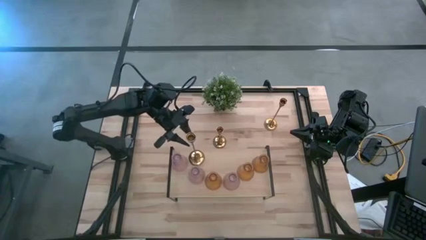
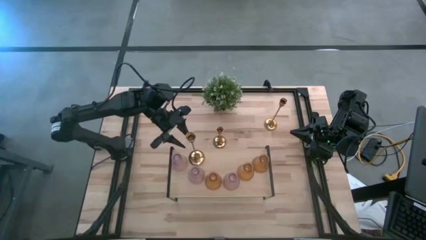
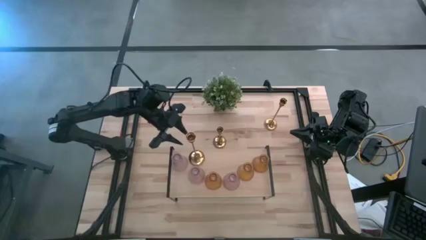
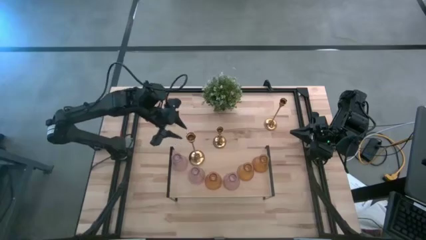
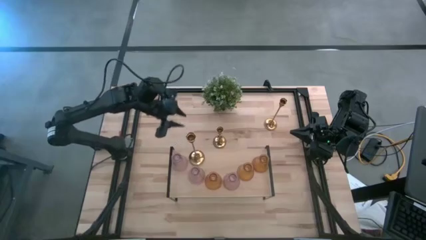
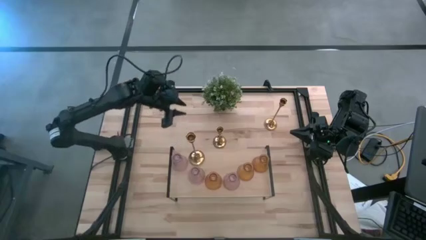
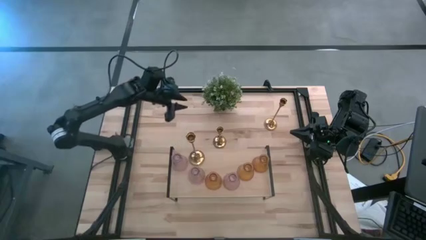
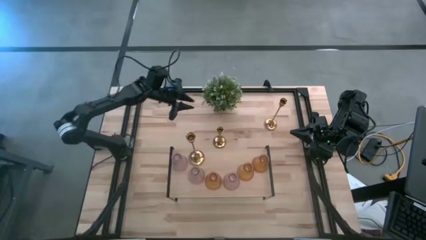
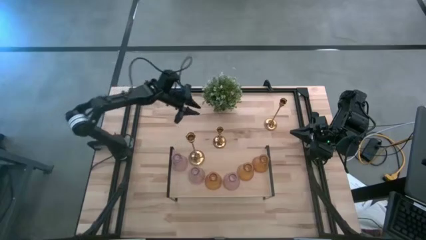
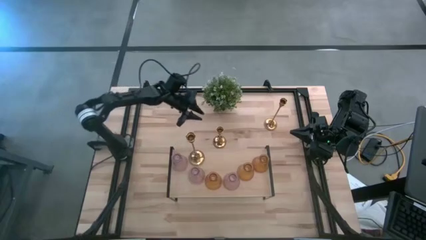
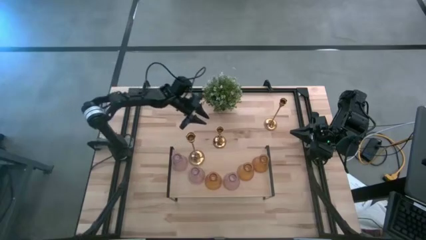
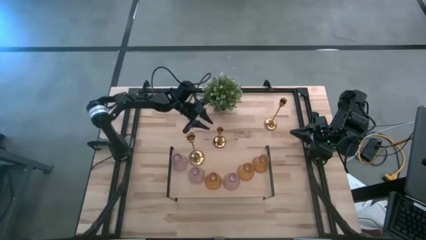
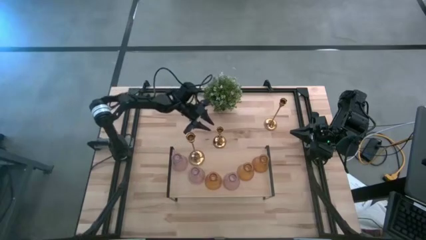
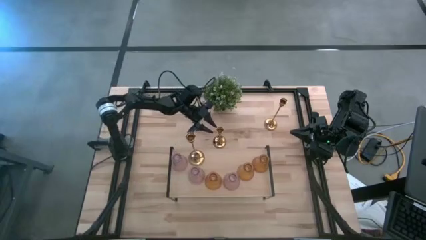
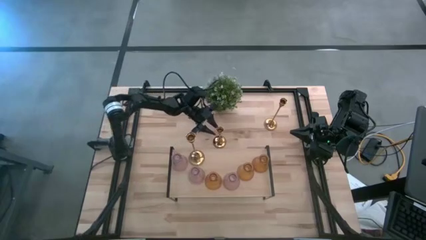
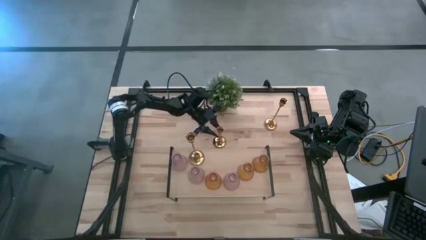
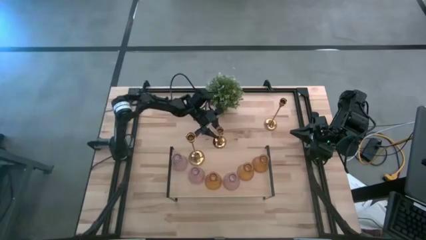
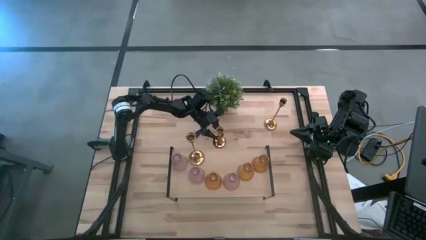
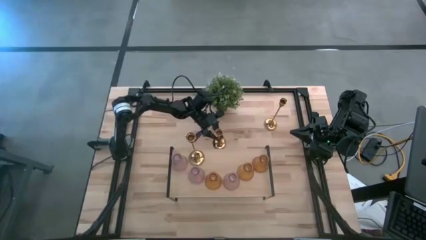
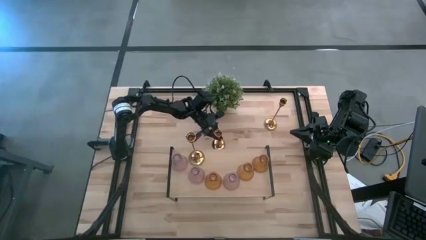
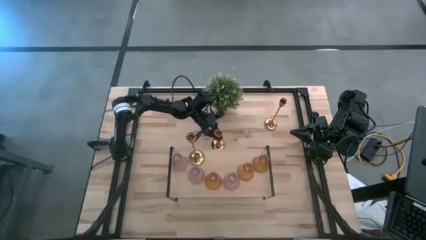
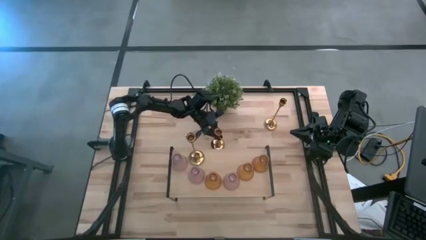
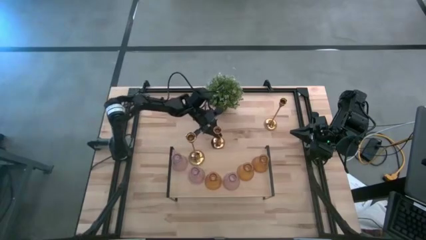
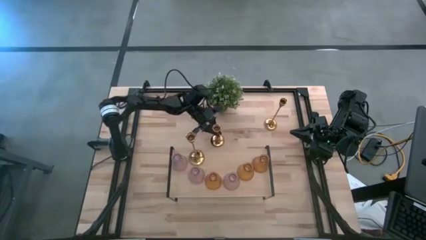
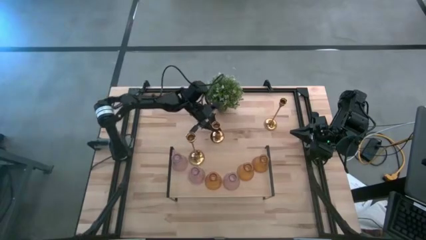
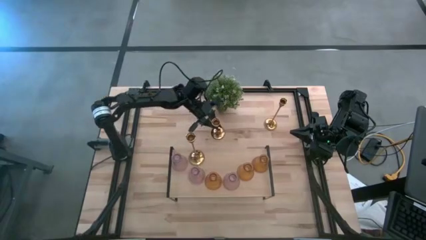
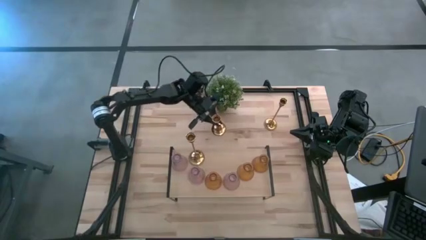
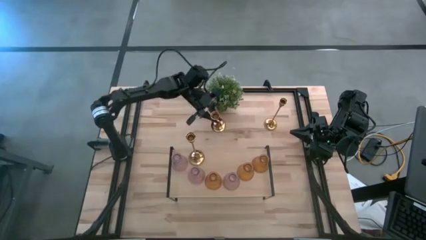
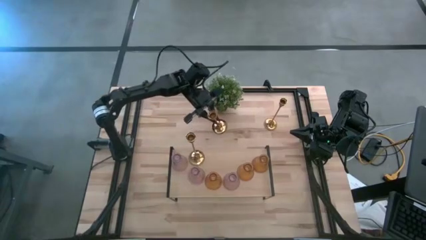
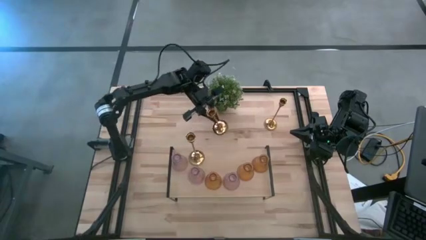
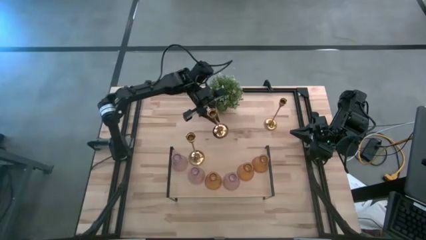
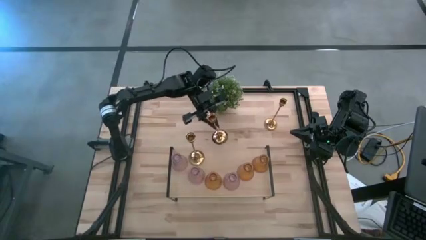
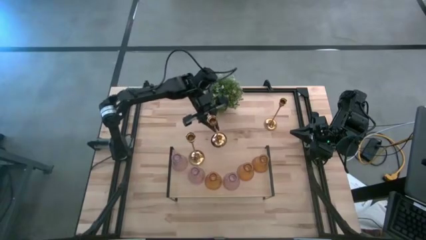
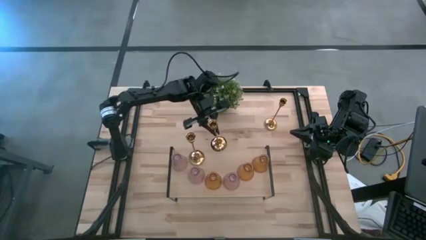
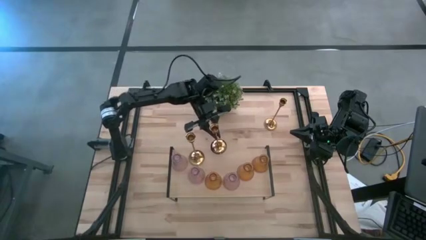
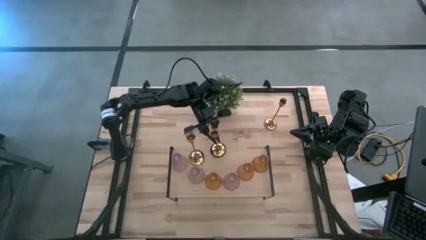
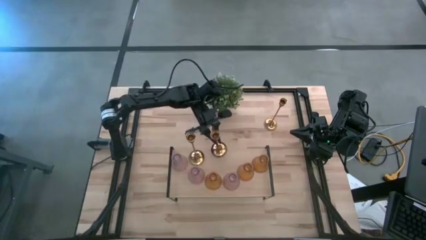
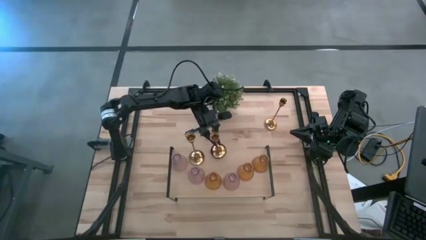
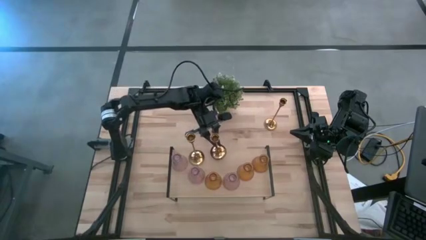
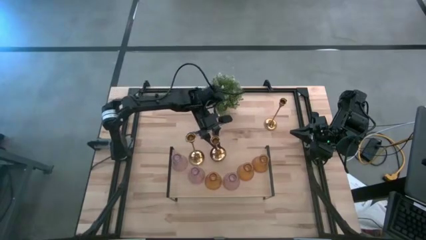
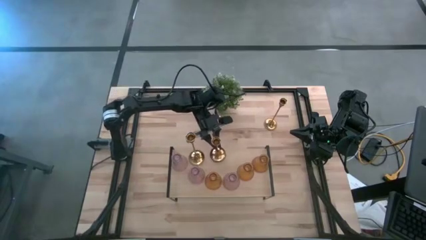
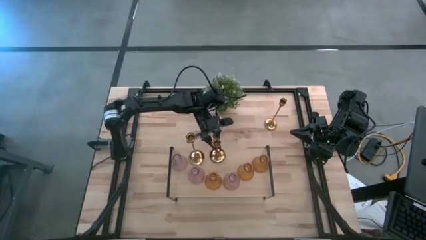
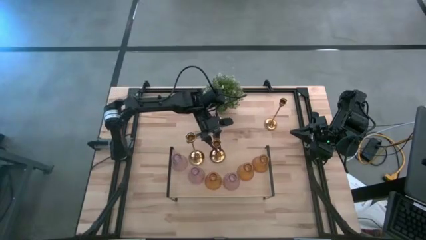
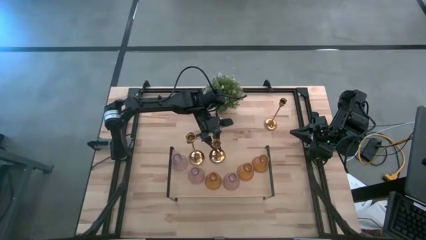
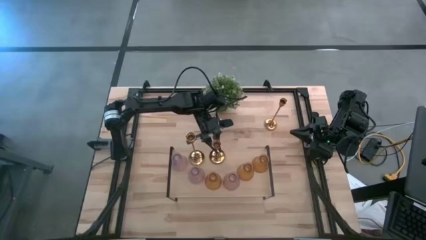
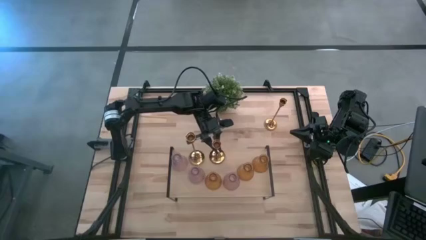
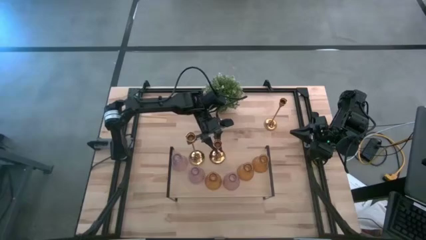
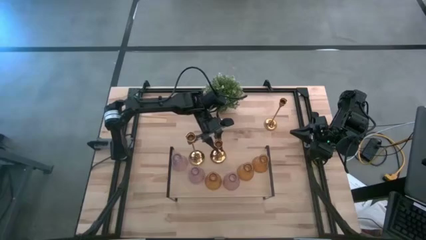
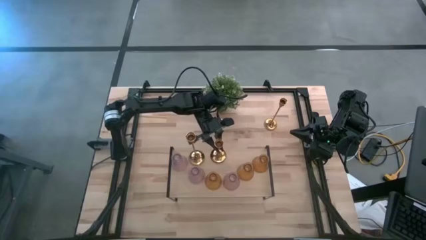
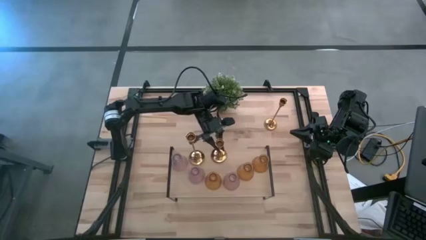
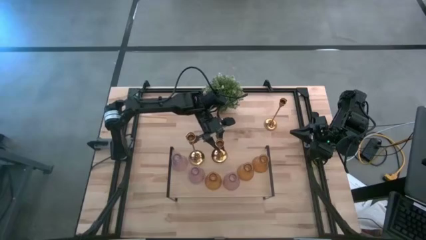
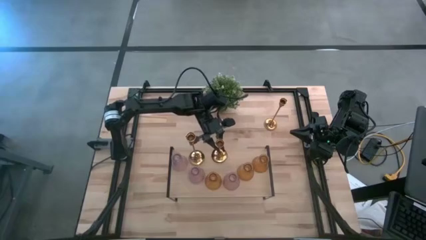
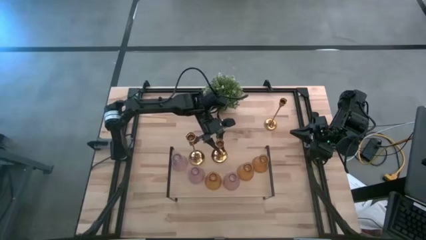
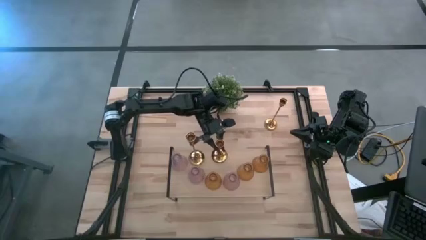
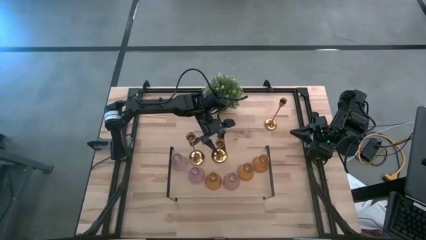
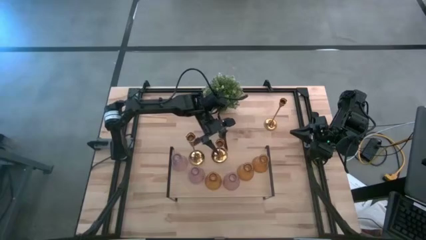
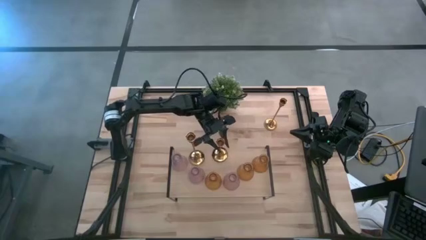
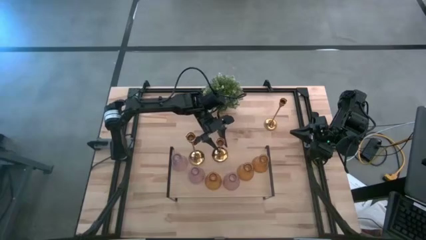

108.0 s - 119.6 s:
Task: Pick & Place candle stick holders
Put the bottom gold candle holder on the shelf
